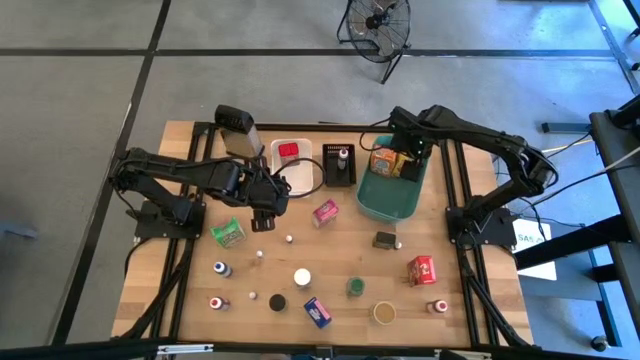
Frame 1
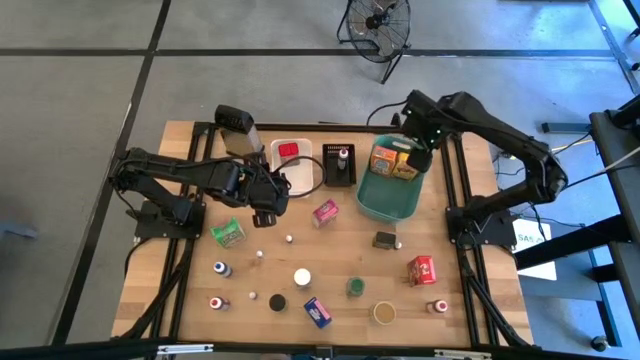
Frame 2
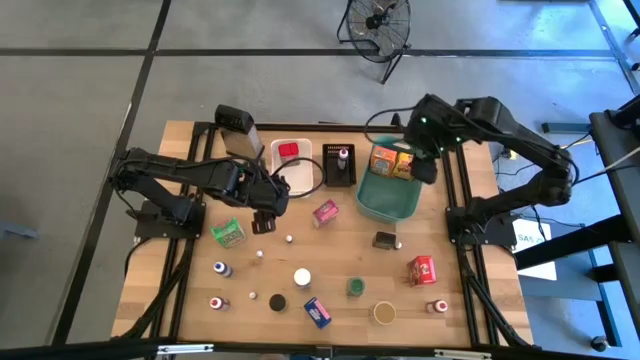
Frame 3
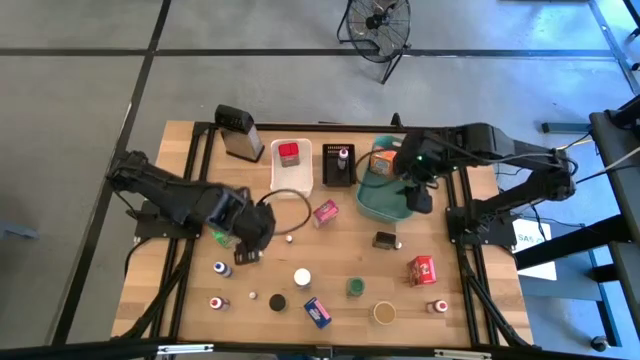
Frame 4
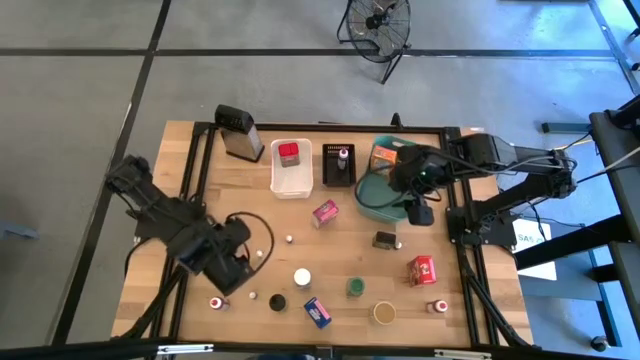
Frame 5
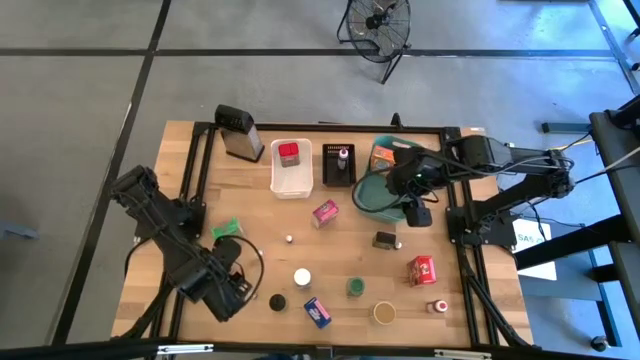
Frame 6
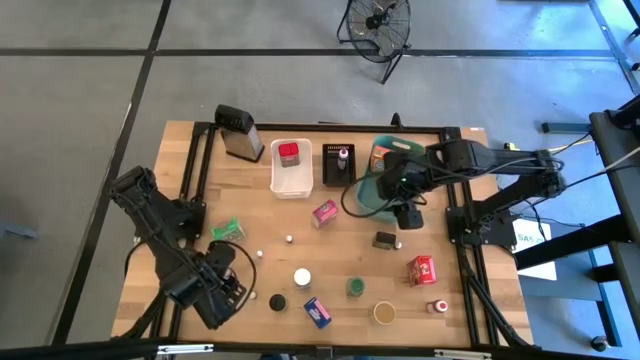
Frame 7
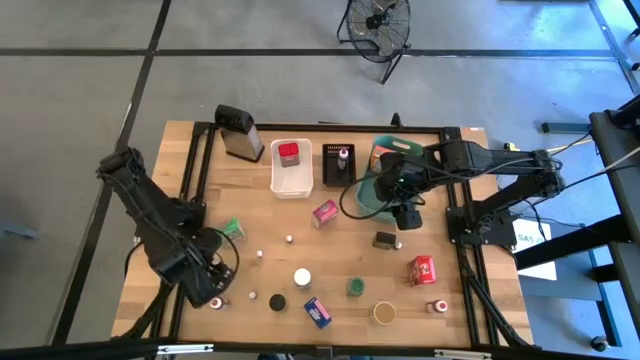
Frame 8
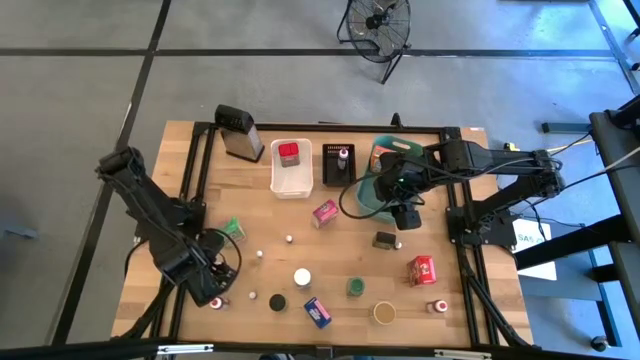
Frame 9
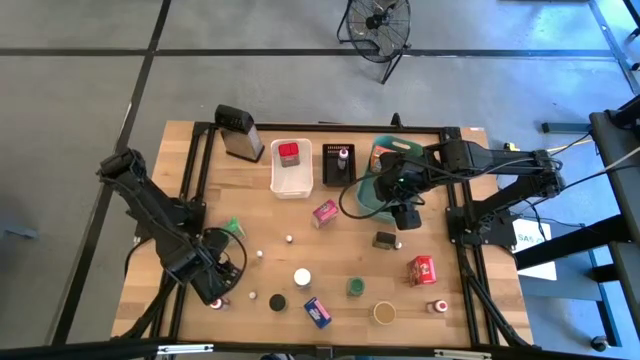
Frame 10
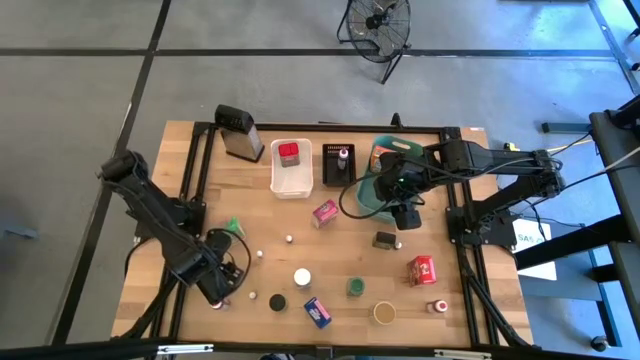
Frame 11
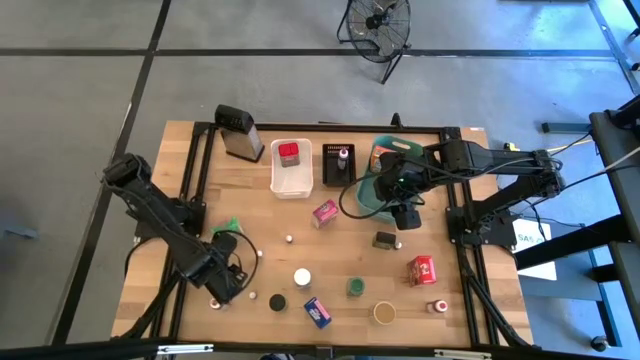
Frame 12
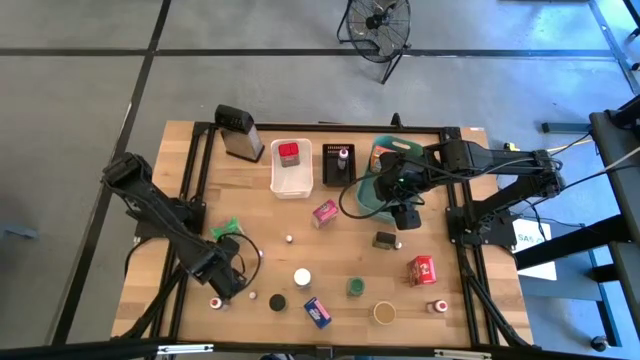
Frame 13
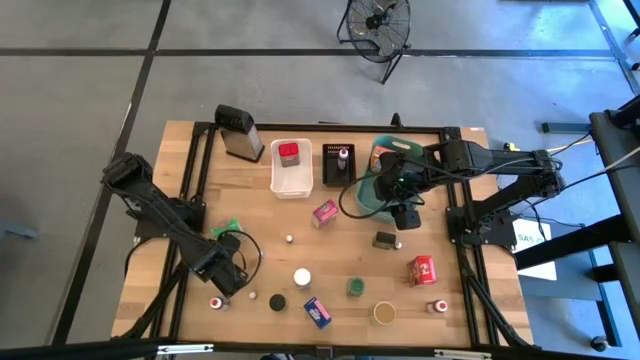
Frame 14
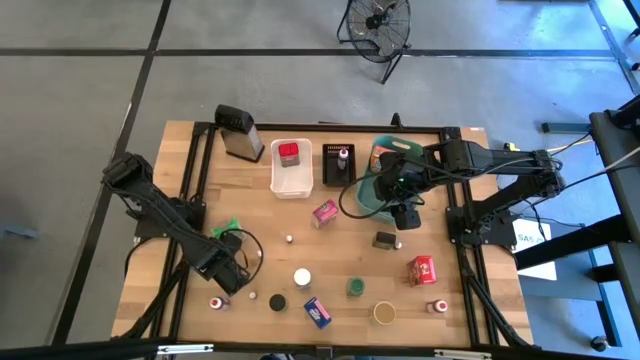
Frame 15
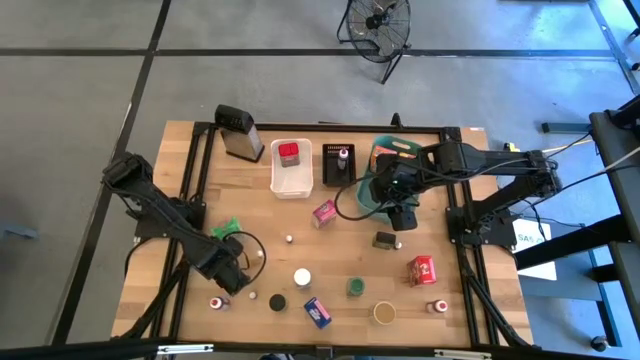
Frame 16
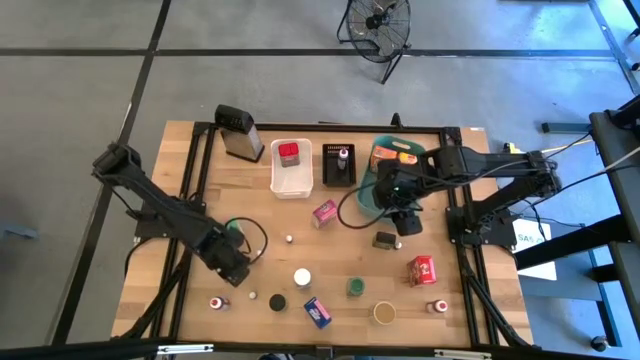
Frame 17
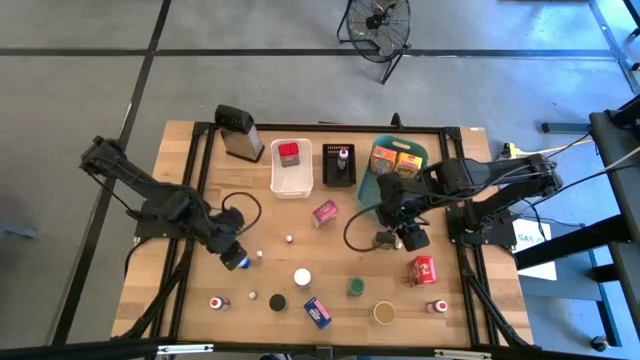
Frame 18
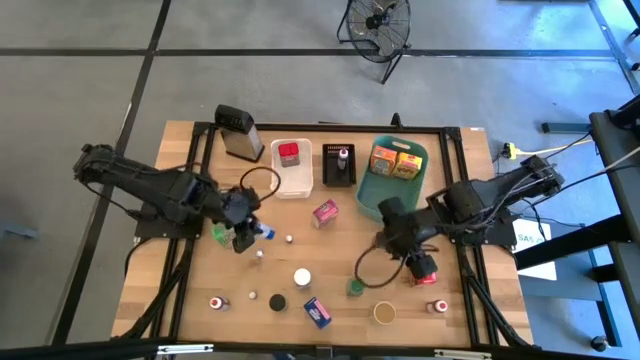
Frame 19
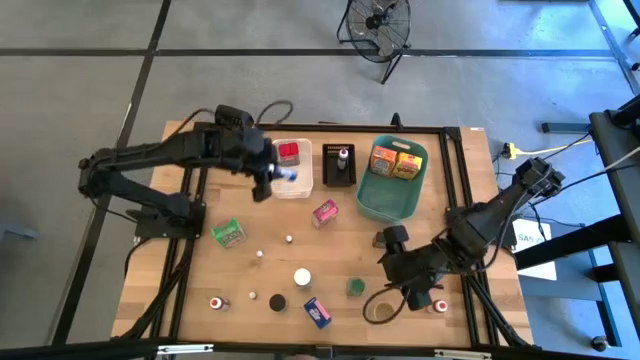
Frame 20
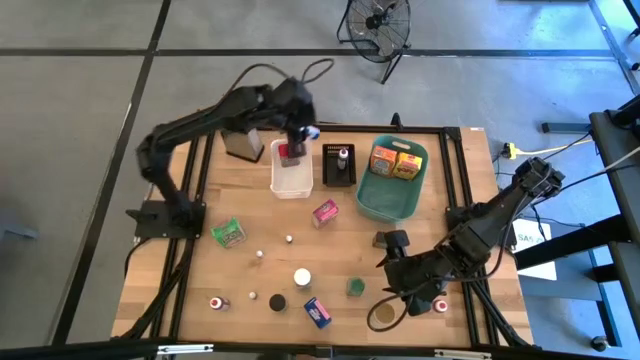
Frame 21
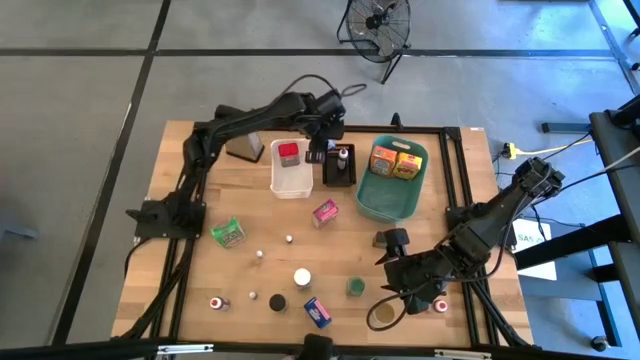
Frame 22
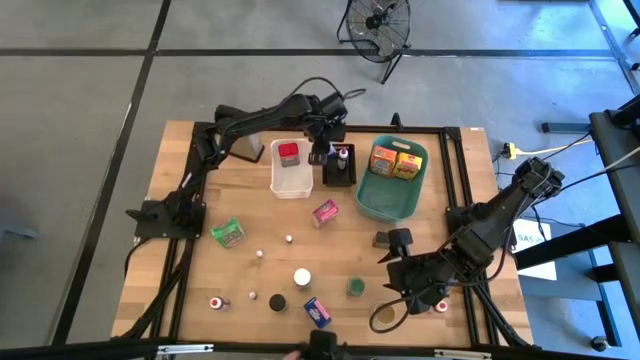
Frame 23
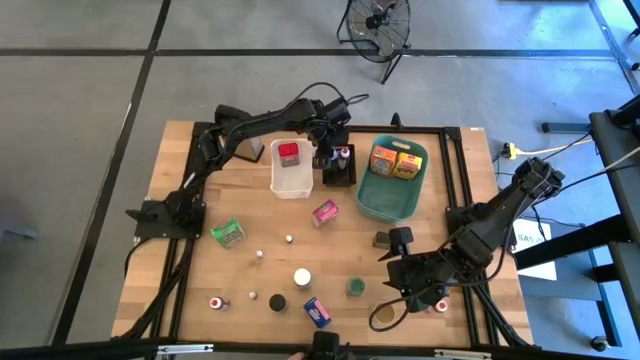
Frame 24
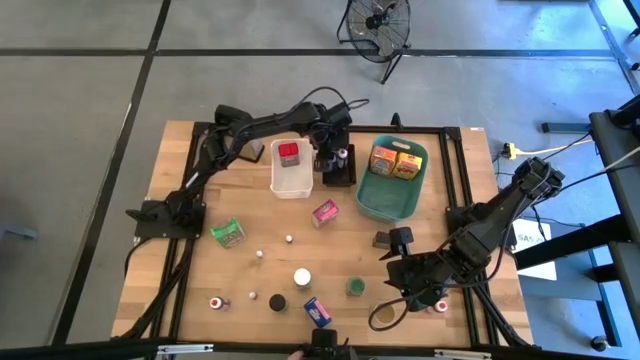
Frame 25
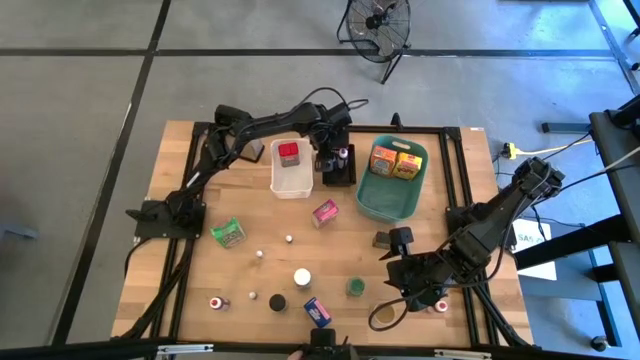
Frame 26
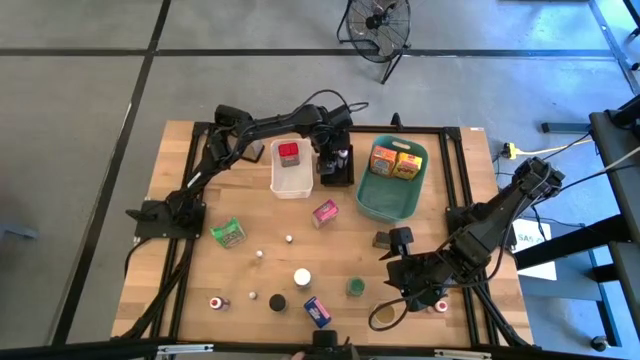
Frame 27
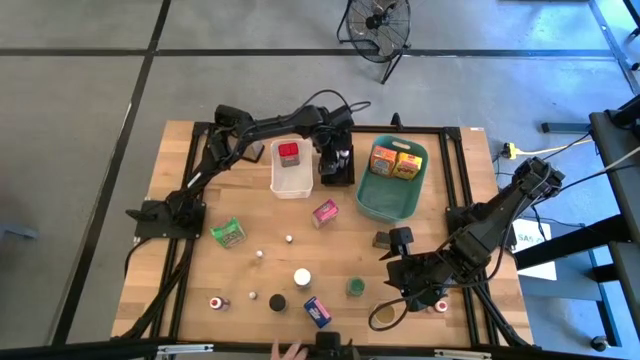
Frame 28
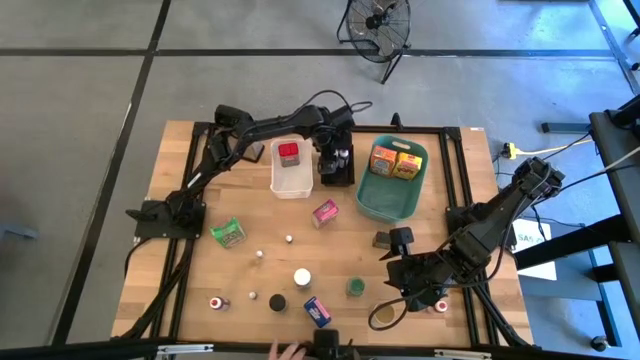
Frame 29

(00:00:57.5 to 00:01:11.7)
Task: Pick & Place Kitchen Items
Put the large blue food coloring bottle into the black bin

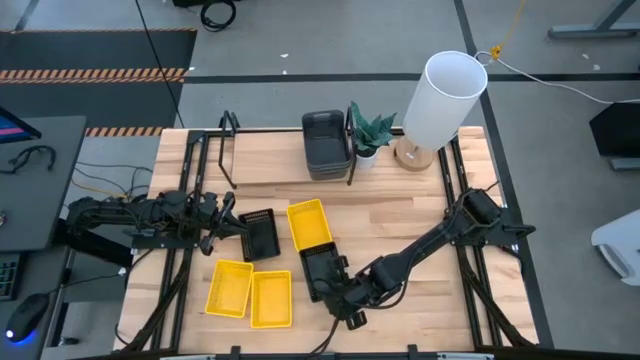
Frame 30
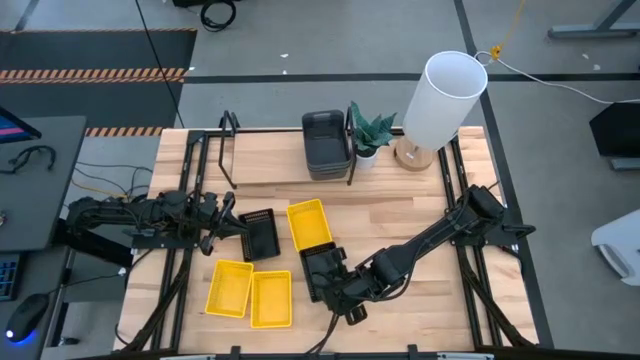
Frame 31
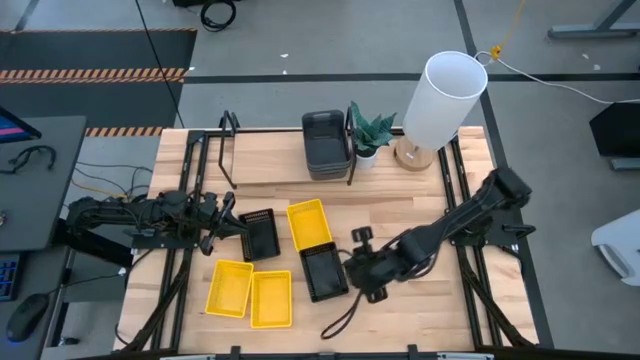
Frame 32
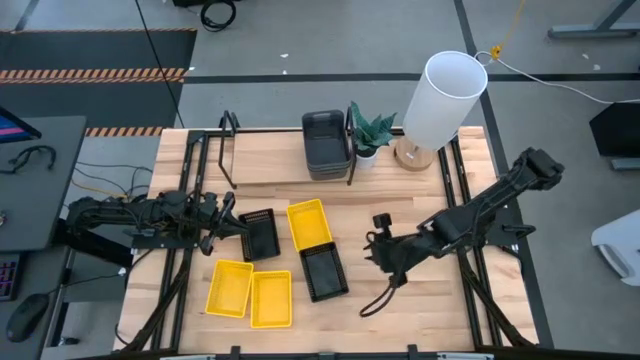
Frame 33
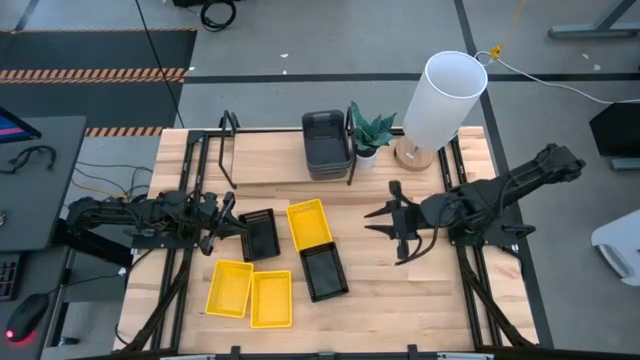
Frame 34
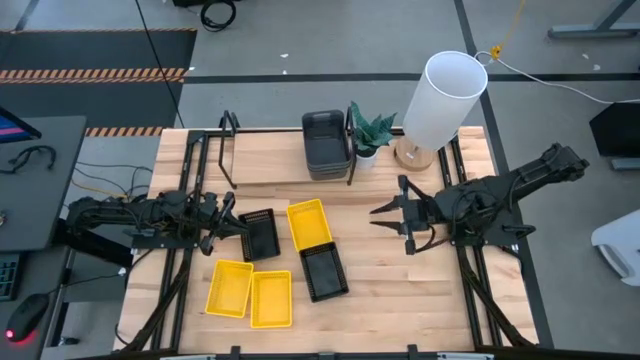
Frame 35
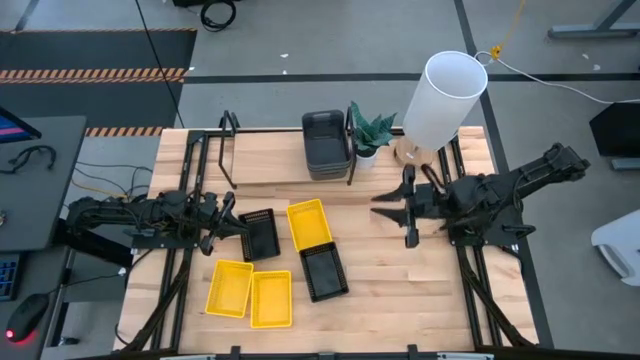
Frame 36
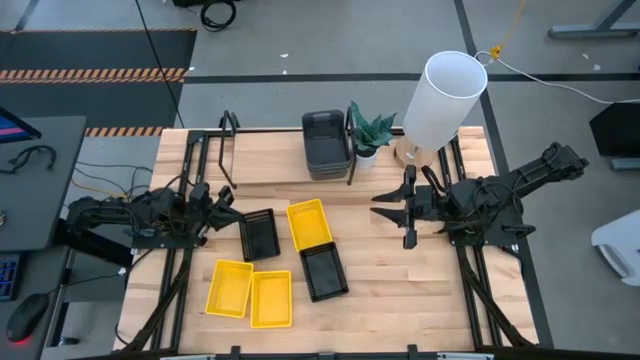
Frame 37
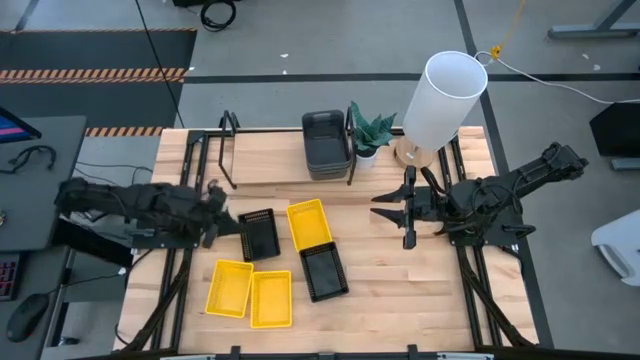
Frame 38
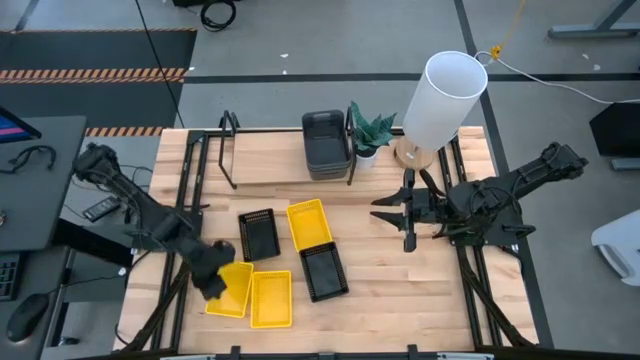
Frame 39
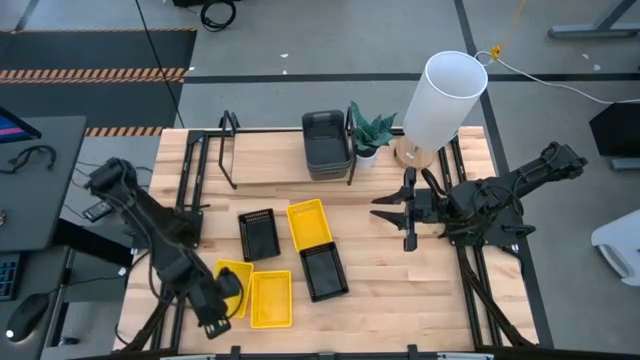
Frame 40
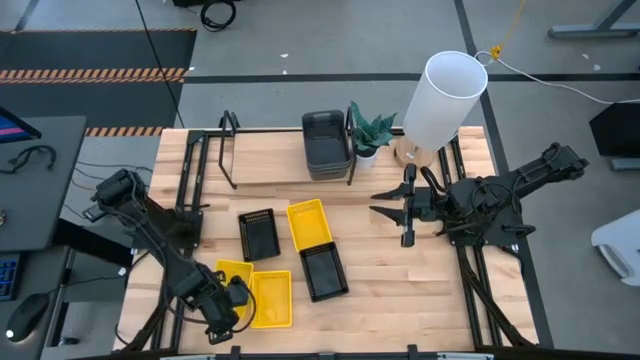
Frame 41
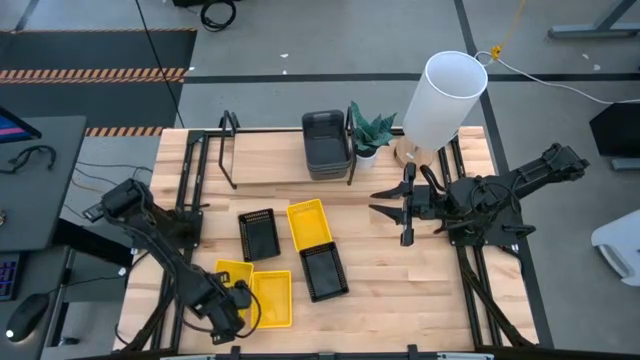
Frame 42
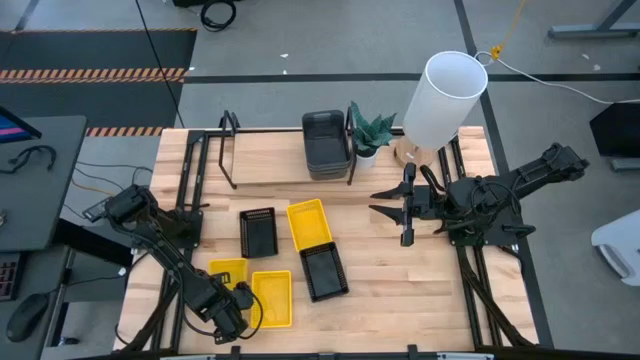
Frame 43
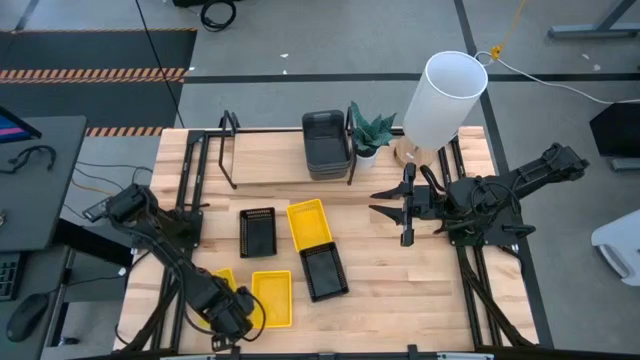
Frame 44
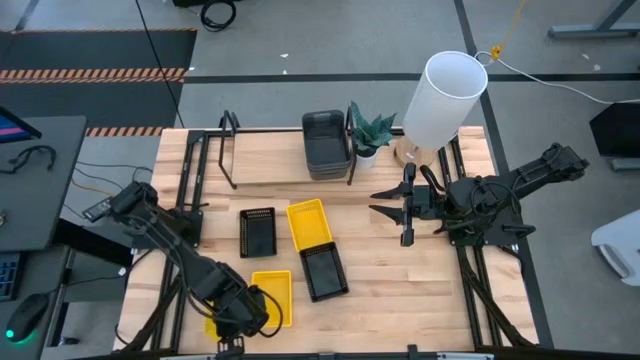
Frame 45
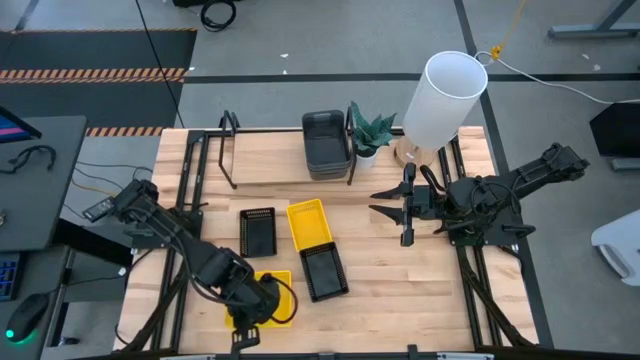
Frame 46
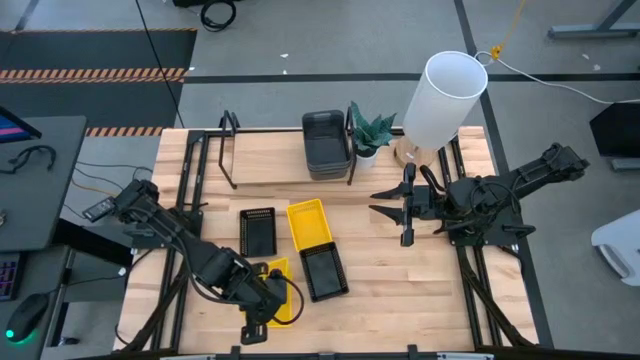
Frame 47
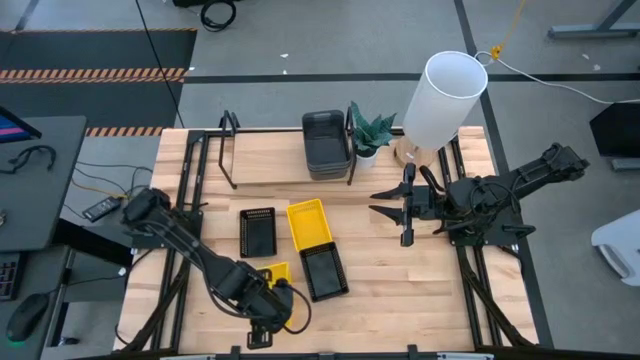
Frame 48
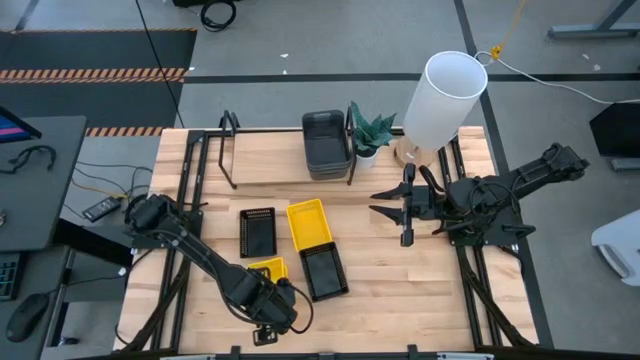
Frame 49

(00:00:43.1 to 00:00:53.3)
Task: Stack baskets on shelf by color
Stack the bottom left yellow bin on top of the bottom right yellow bin
